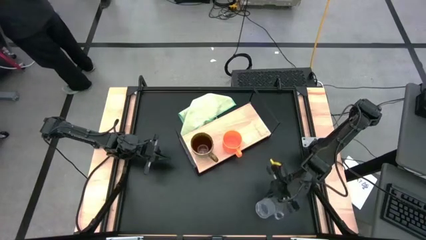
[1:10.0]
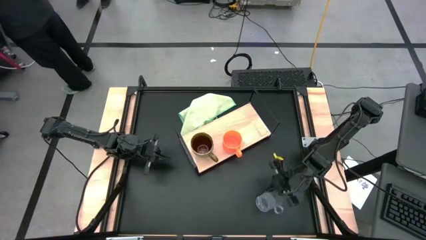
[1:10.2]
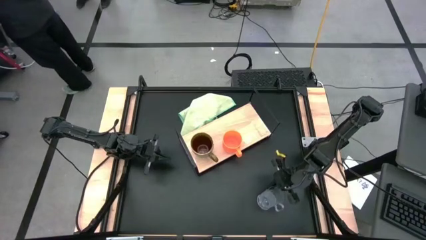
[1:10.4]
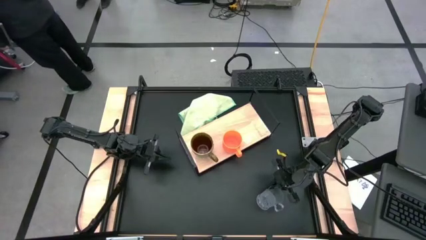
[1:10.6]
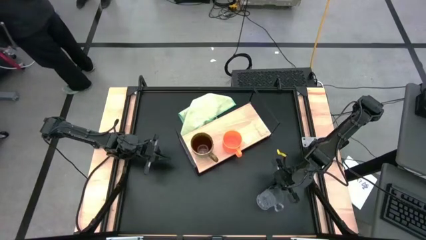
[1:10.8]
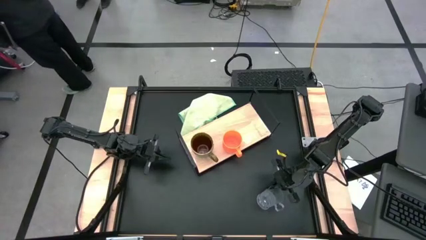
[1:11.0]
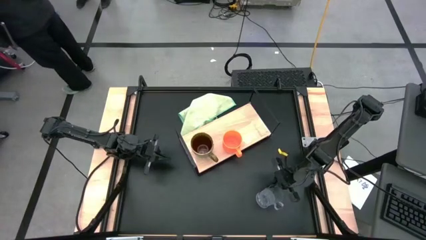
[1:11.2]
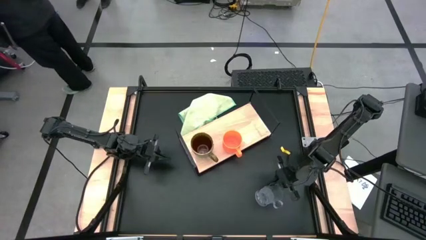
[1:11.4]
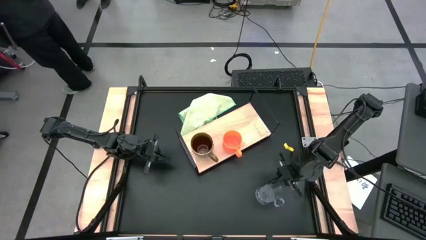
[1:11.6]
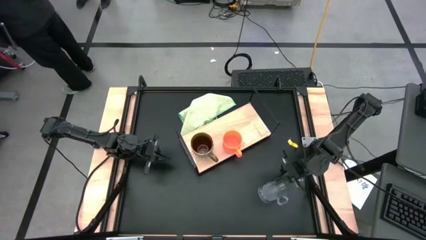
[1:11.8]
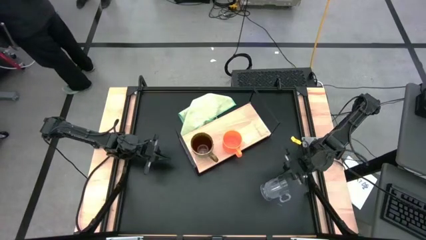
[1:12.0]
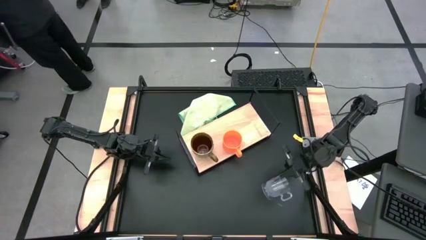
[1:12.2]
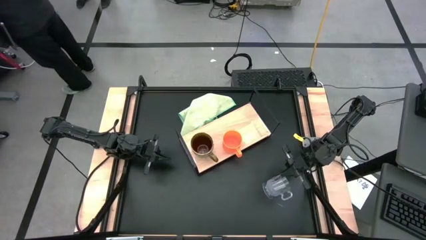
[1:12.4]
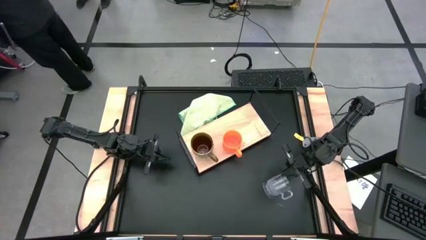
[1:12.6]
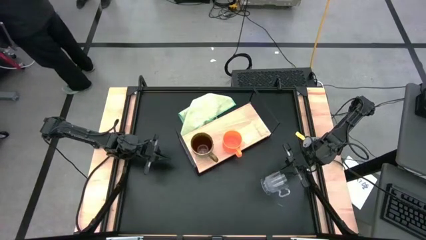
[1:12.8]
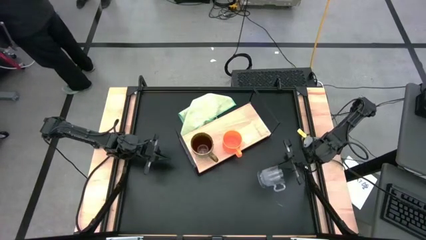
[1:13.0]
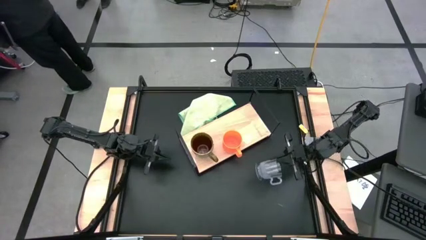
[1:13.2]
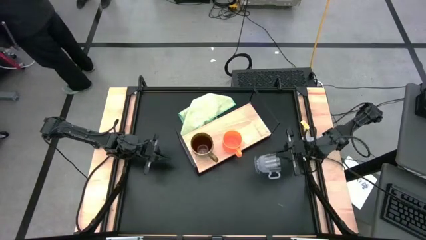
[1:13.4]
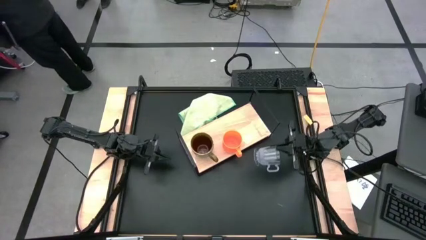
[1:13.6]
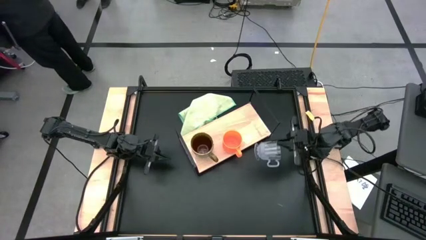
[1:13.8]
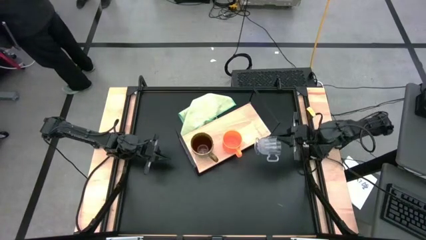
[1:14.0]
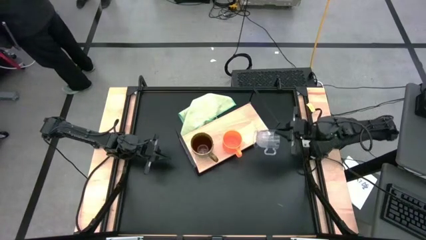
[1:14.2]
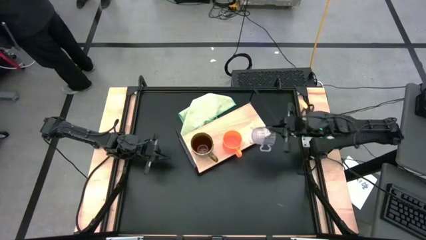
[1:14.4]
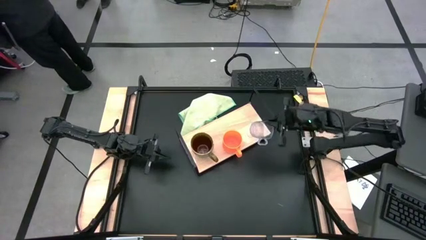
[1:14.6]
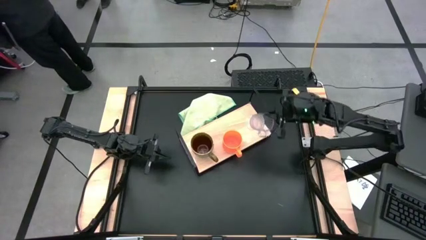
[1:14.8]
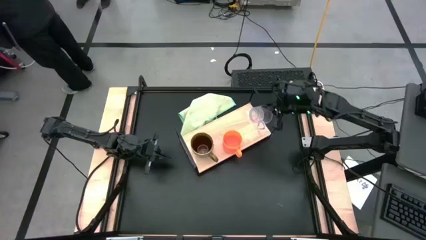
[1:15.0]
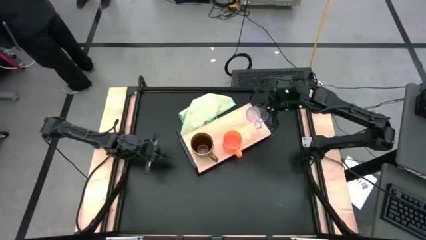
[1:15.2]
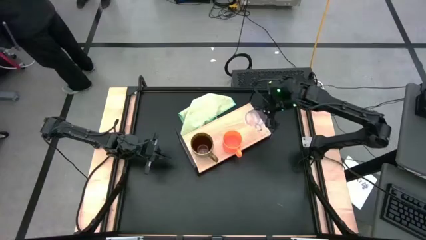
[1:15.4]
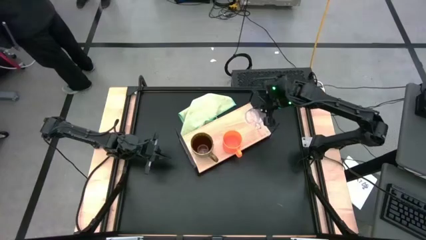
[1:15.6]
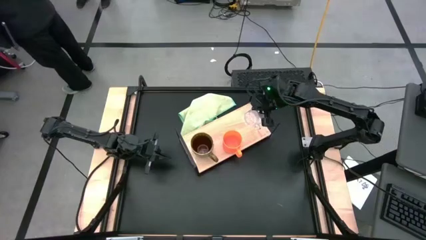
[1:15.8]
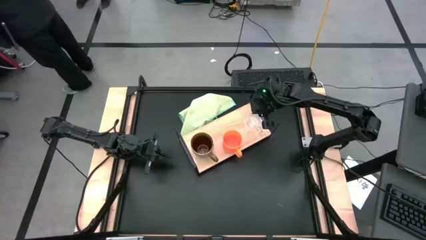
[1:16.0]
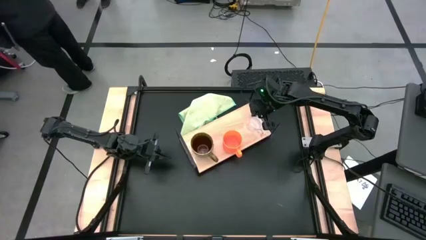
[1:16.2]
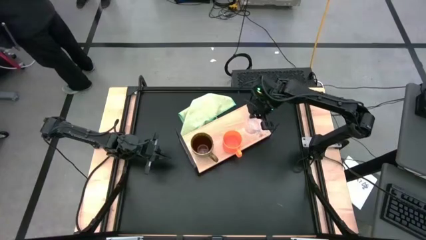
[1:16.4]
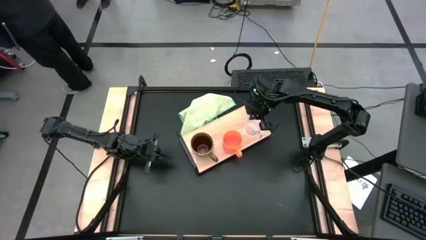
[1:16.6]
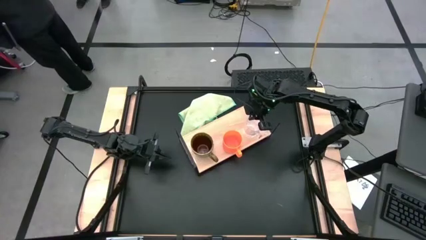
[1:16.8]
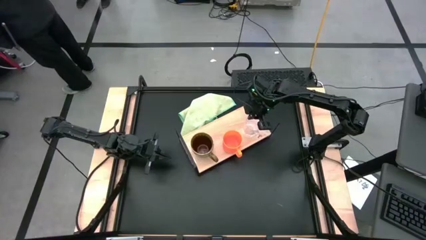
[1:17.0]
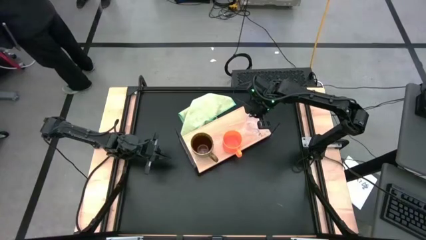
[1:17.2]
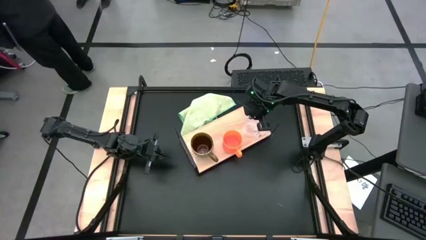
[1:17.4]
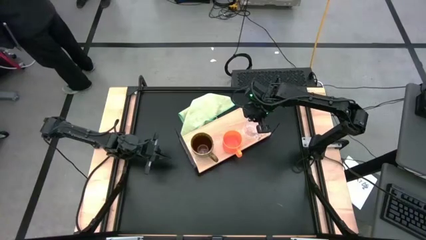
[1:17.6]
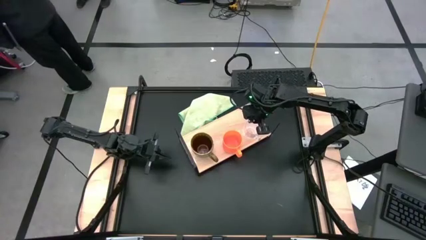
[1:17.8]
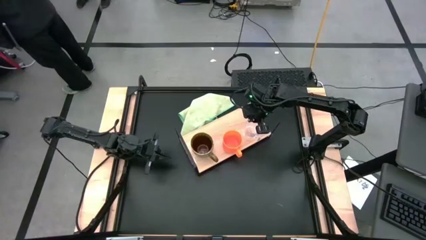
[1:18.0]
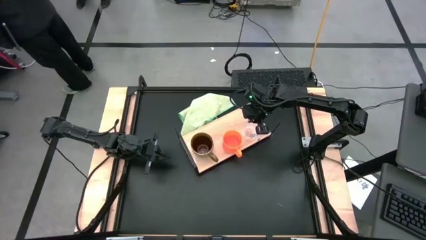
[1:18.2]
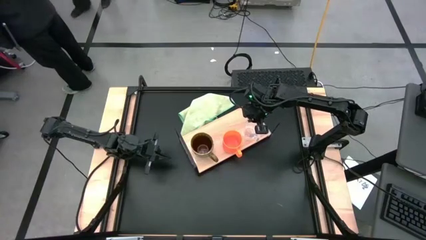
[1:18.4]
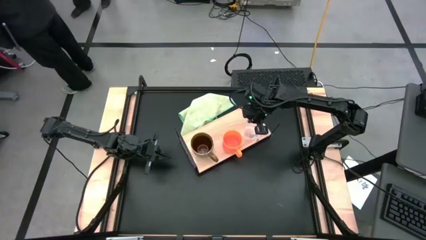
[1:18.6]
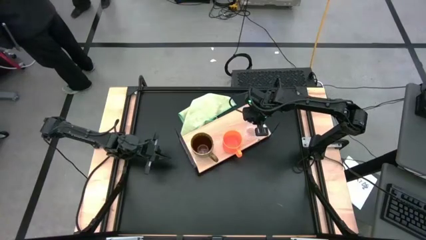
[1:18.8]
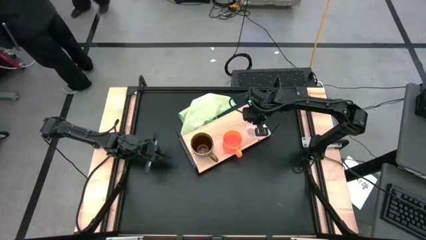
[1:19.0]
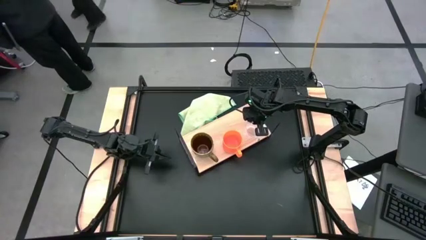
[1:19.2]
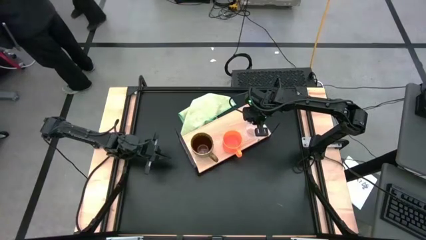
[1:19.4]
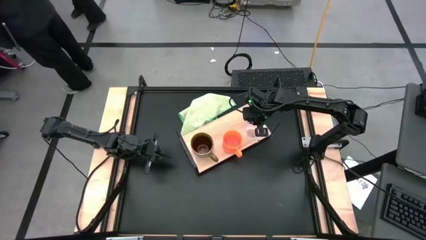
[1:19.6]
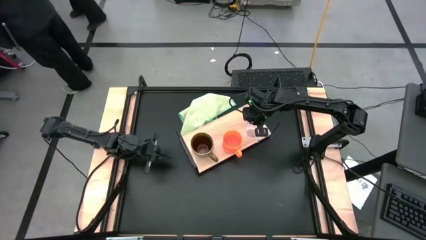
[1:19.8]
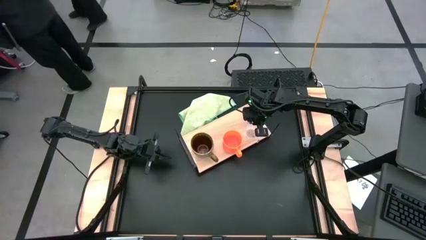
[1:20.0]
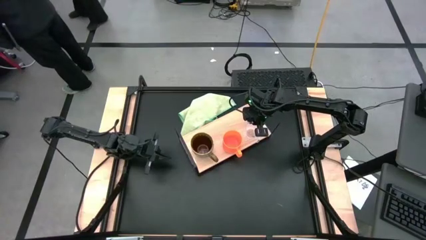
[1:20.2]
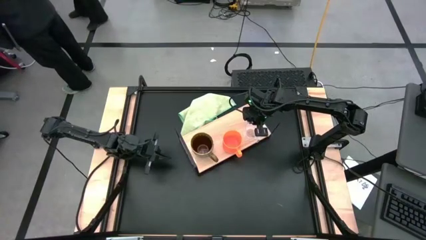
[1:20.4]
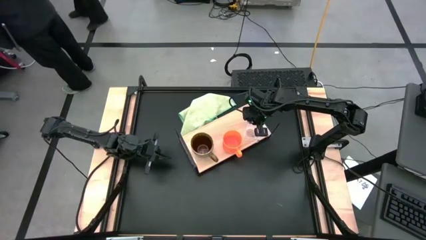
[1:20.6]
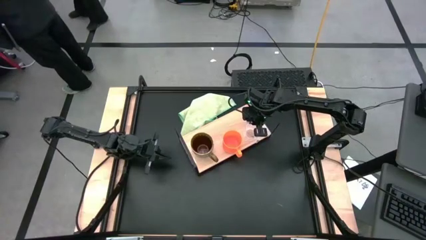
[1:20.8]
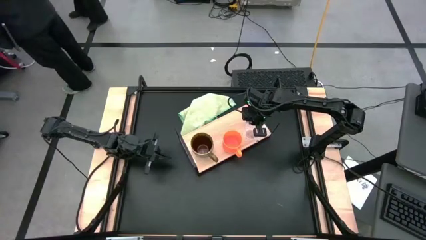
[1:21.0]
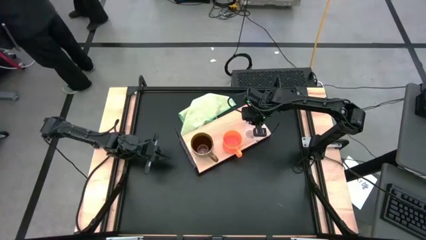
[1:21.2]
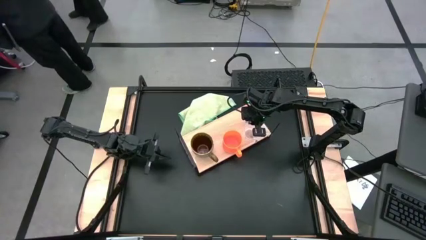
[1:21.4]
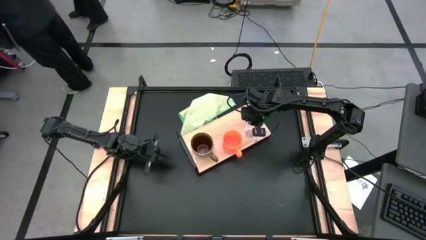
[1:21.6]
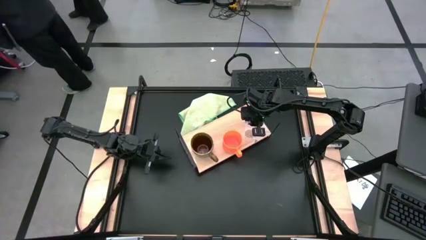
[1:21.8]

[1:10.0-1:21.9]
Task: Stack small to large cups/mugs on shelf
Put the transparent mug on the shelf

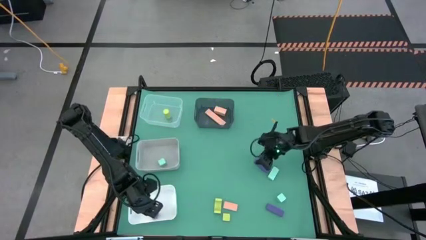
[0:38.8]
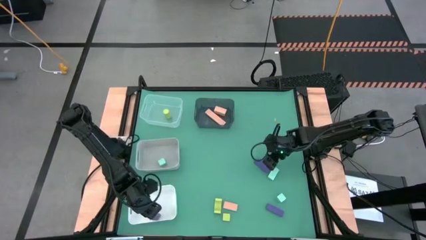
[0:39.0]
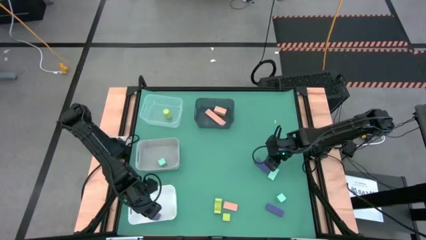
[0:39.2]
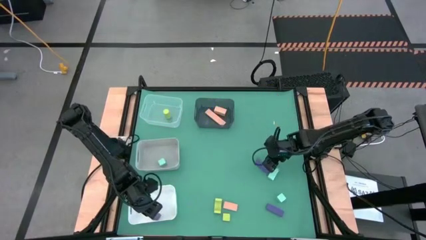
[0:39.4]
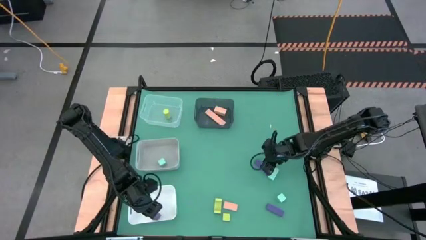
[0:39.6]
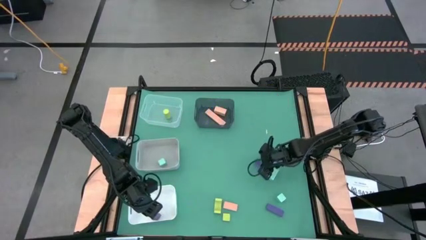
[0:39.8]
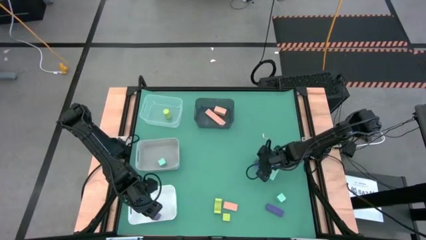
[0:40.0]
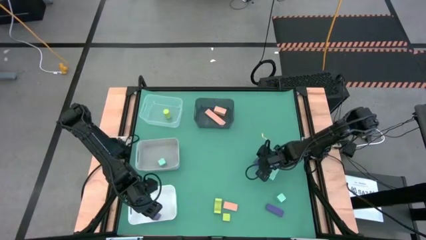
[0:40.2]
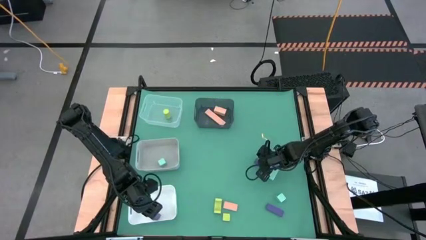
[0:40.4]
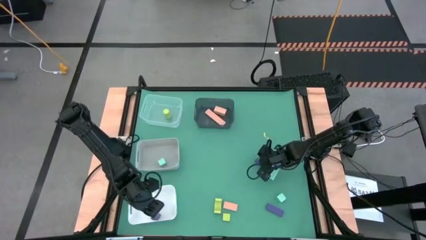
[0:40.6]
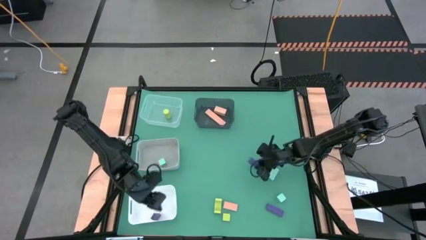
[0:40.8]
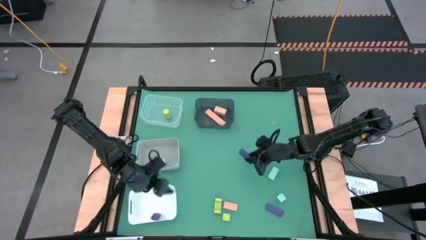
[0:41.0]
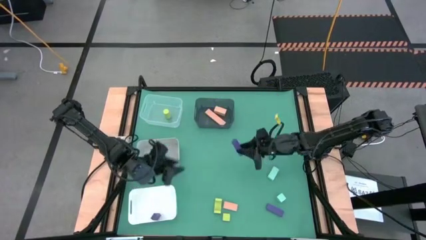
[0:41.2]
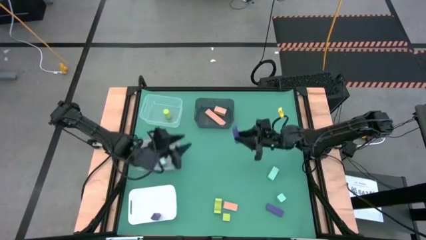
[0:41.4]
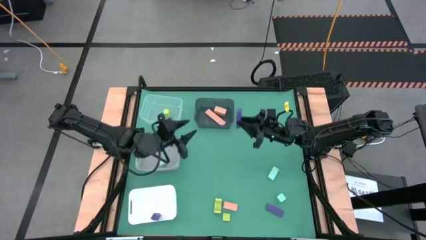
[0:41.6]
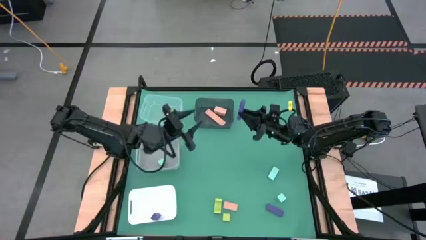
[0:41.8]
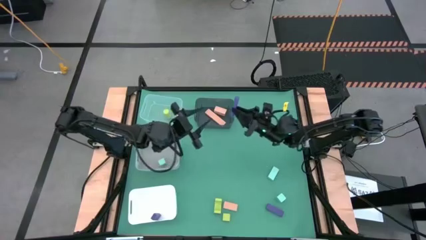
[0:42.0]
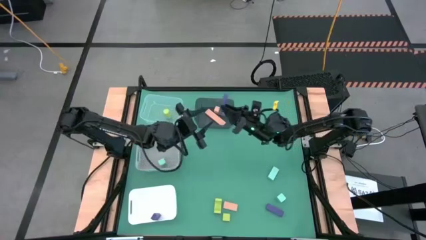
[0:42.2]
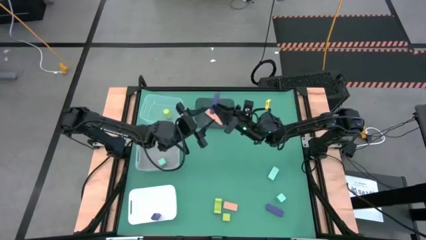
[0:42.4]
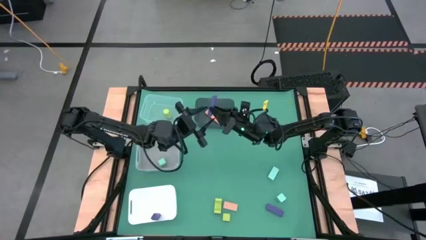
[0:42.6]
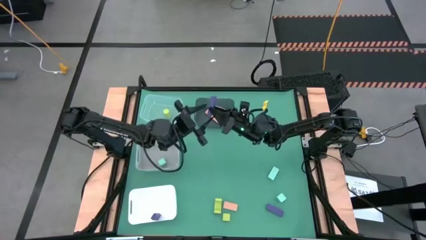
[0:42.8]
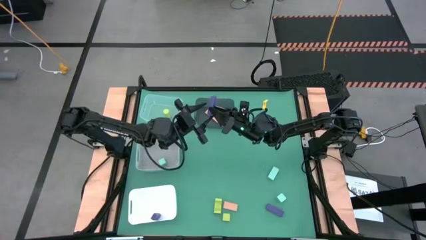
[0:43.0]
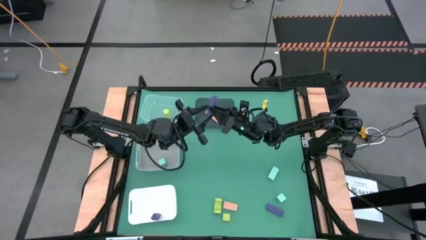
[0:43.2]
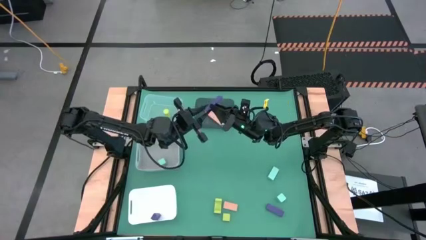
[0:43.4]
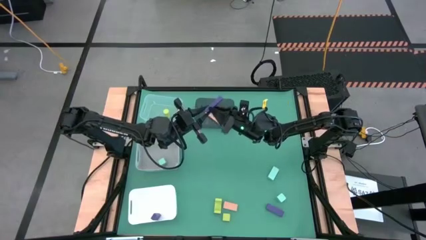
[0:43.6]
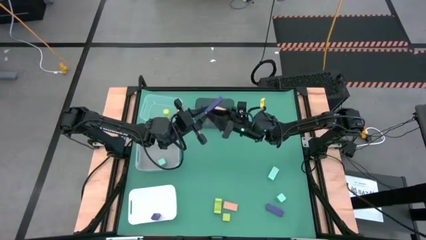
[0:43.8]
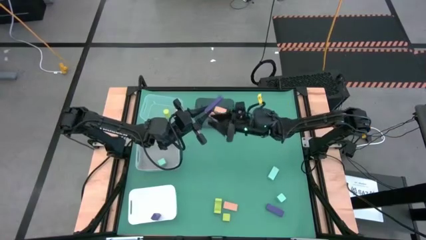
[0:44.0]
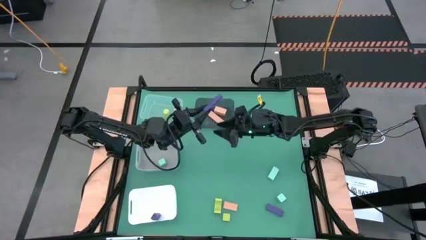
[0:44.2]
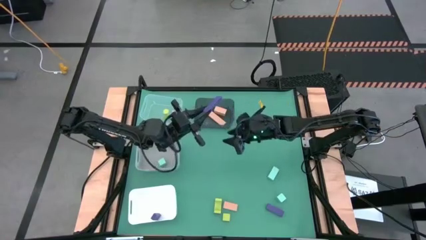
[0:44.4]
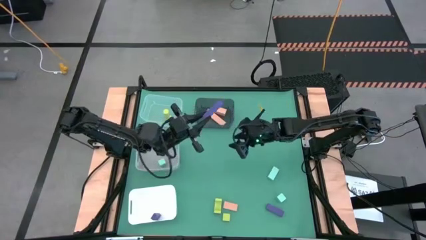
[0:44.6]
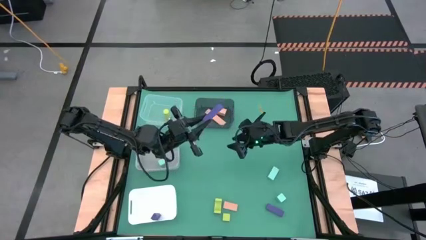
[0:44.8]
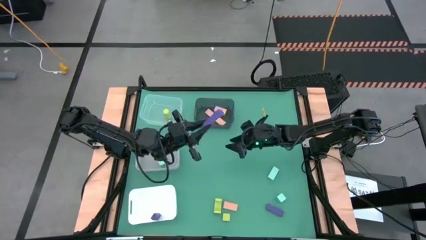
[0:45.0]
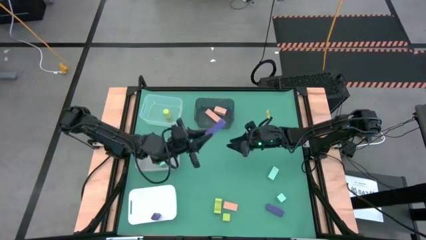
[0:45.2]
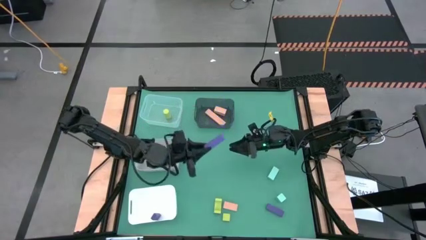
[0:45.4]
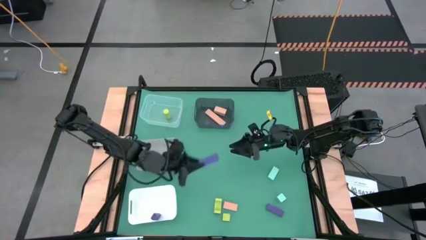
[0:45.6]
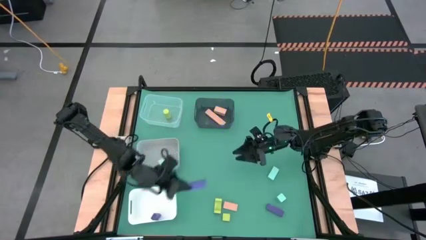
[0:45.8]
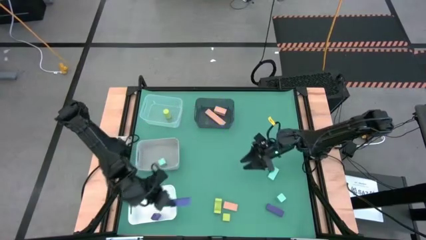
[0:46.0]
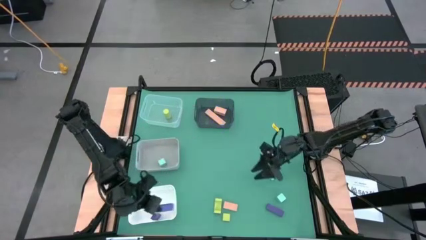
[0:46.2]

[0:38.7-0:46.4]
Task: Sort & place blocks by color
Put the top violet block into the white bin
